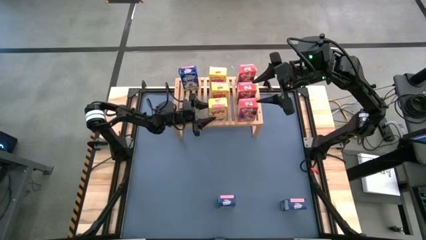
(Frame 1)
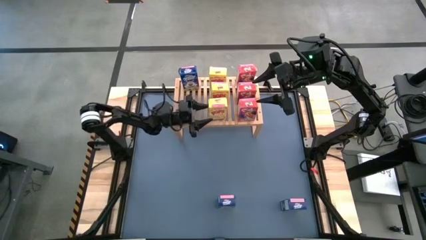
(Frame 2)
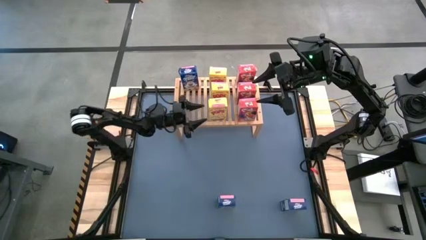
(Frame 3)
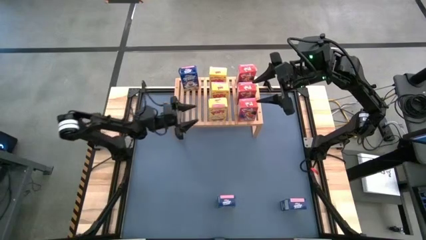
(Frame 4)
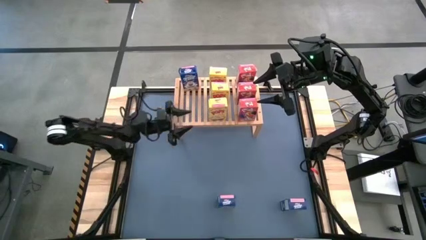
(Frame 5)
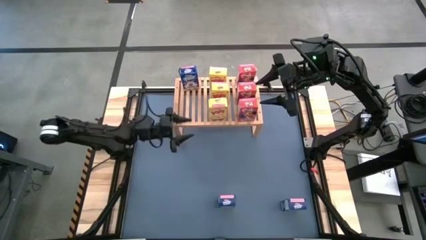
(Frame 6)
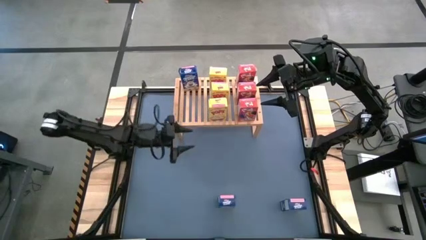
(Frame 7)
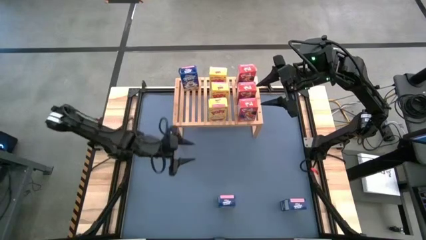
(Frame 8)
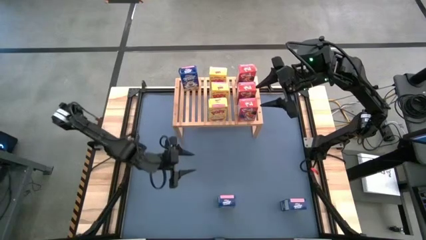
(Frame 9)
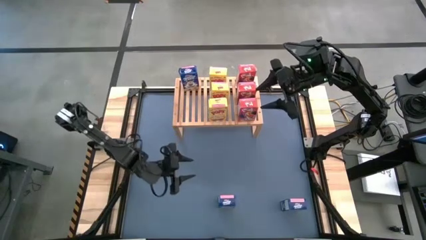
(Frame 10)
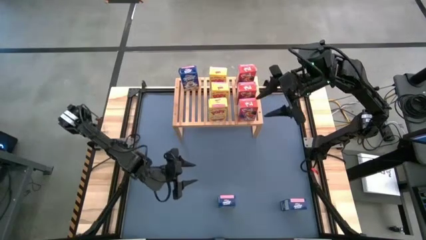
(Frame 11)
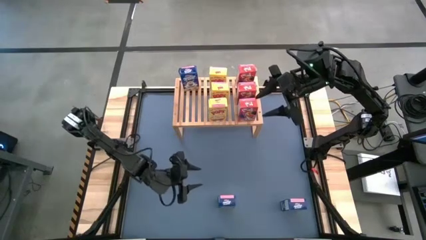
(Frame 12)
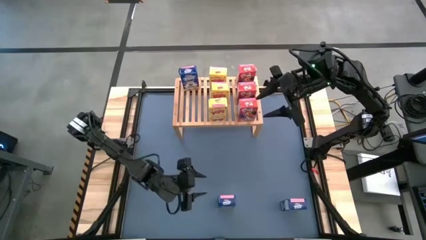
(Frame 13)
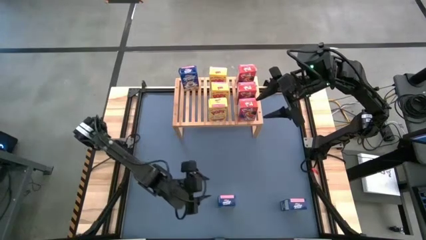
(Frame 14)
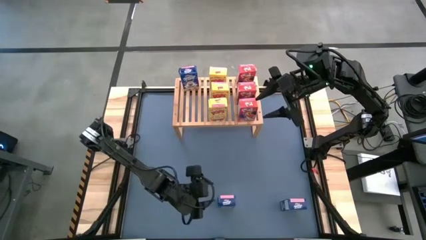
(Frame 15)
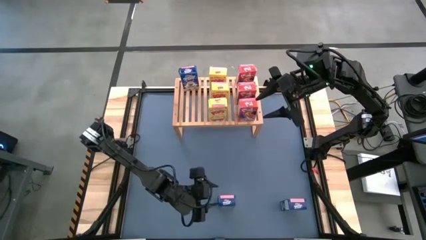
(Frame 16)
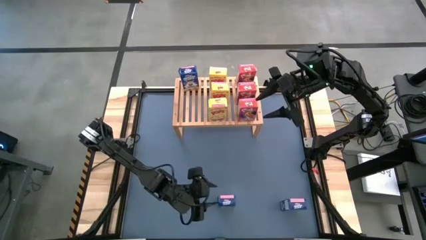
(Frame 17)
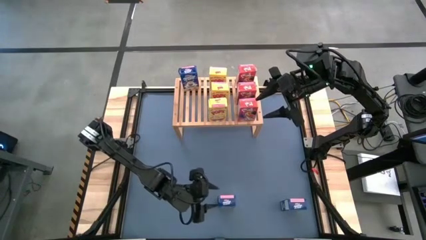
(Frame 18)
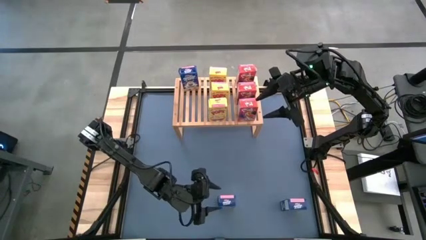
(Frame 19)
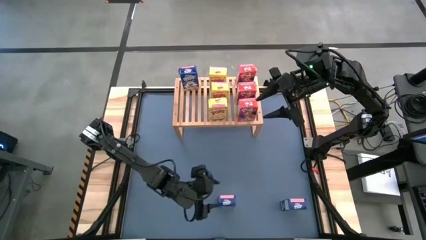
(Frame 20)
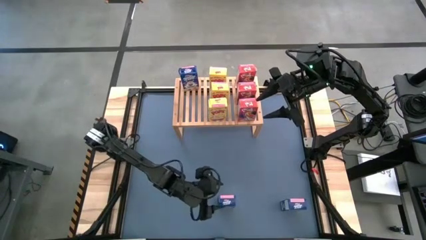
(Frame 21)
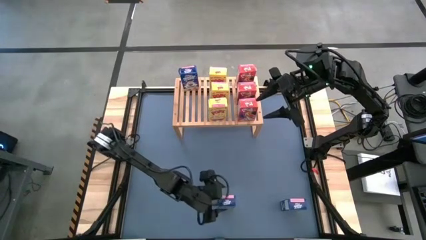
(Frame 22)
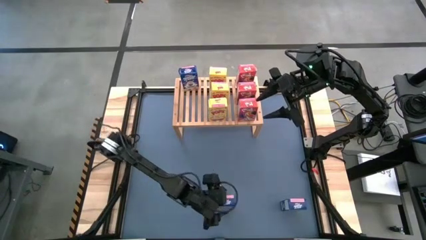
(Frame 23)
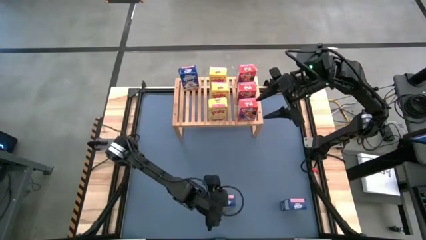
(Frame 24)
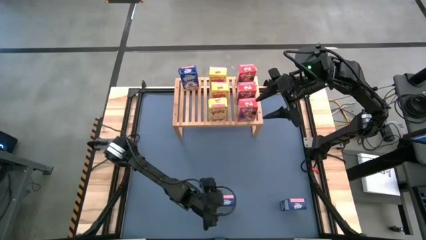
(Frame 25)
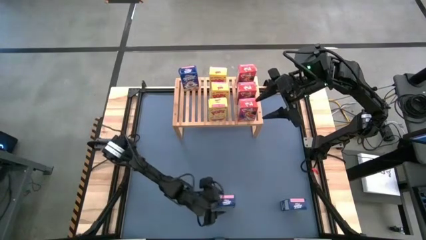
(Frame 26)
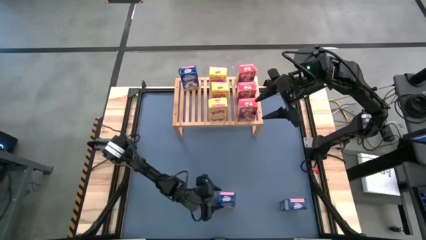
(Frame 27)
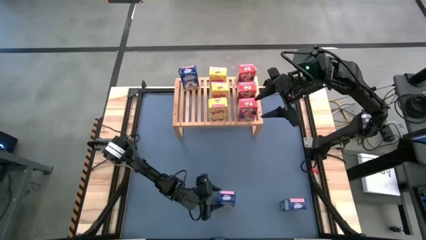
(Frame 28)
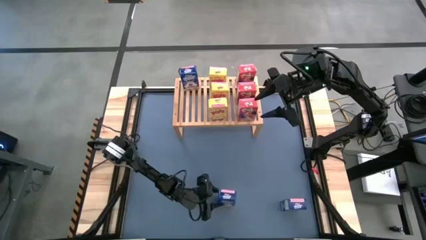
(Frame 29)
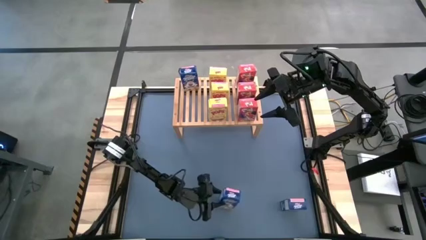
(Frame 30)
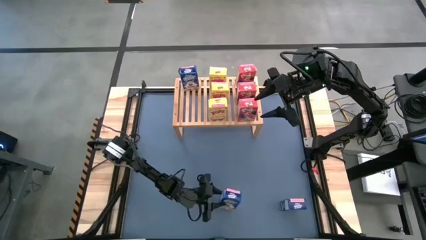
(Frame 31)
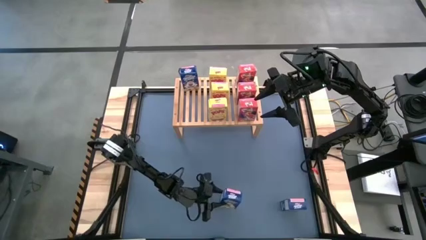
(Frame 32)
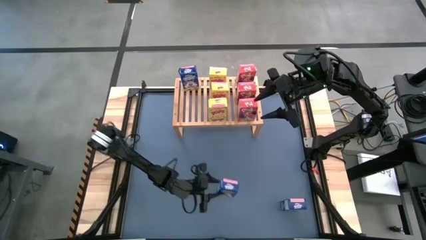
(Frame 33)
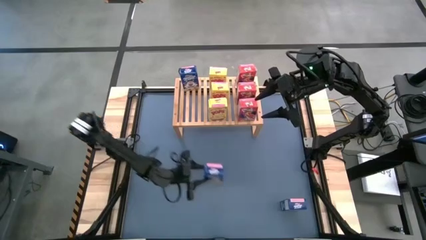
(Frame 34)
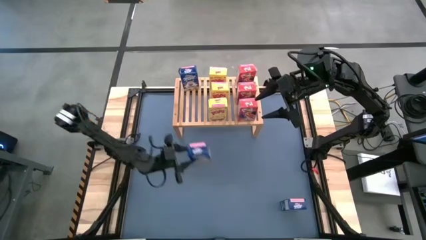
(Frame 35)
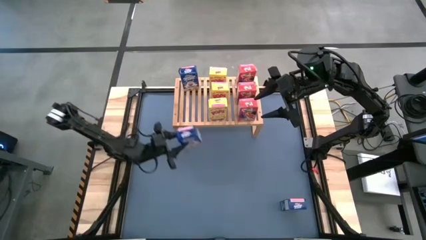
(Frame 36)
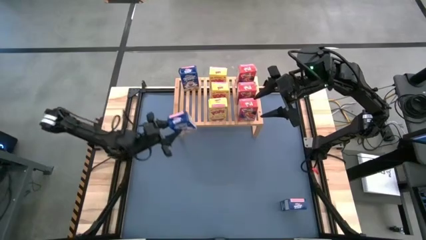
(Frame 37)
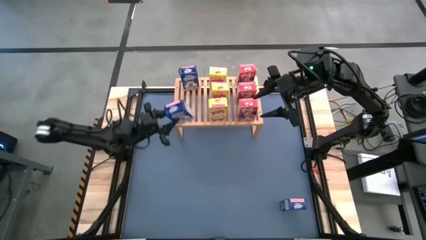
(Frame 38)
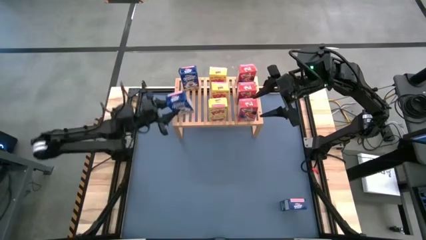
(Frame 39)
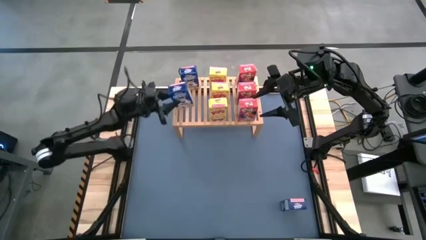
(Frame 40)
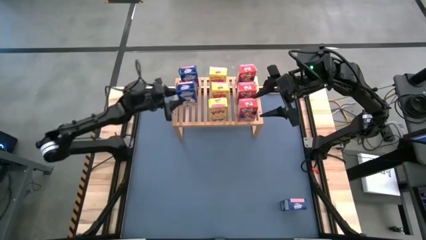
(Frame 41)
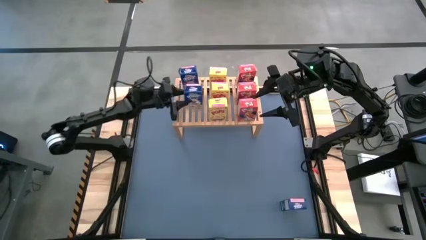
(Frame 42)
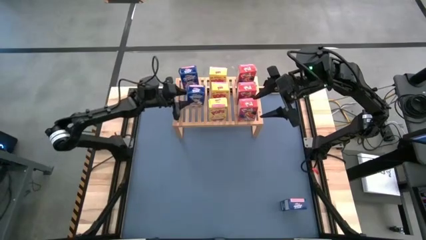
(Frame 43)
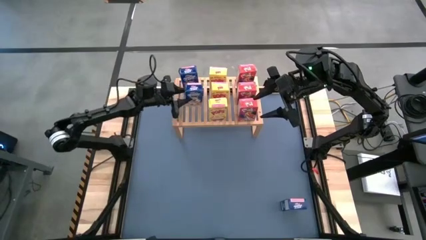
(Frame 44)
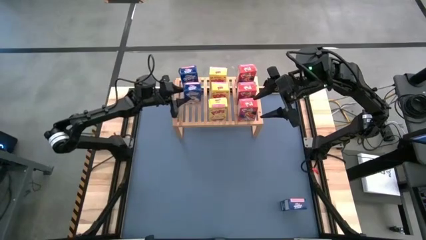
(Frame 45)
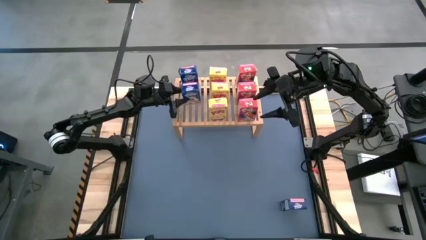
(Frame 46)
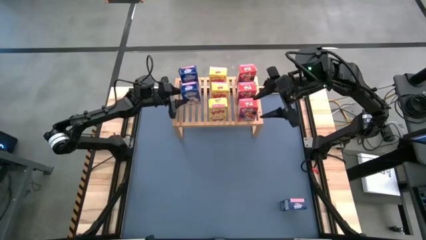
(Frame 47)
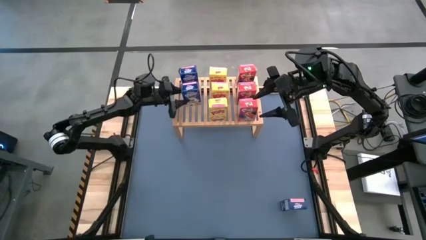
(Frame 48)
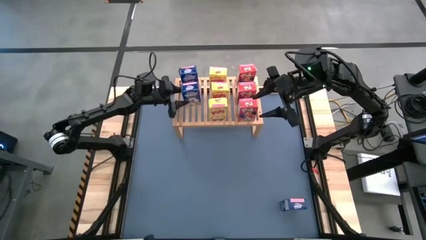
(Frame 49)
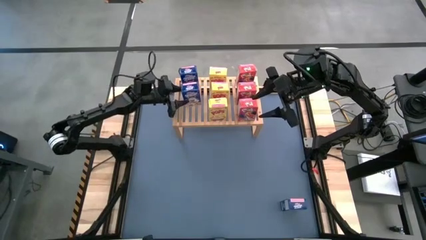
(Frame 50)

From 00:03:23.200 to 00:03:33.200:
Task: Stack cereal on shelf
Put the left blue cereal box on the shelf aligned with the other blue cereal box

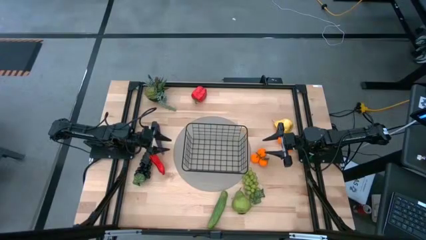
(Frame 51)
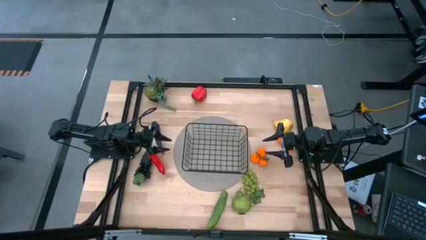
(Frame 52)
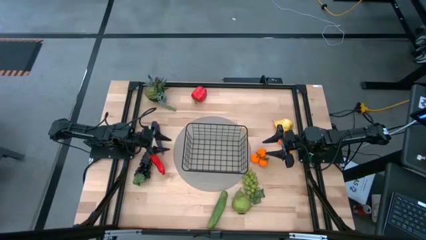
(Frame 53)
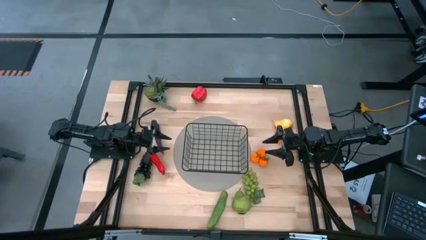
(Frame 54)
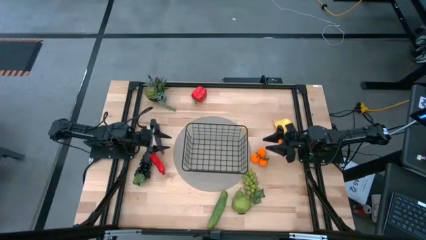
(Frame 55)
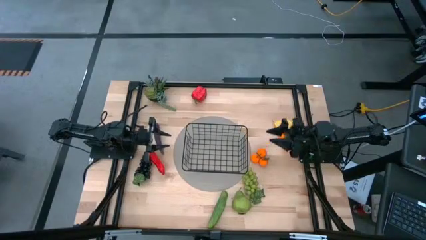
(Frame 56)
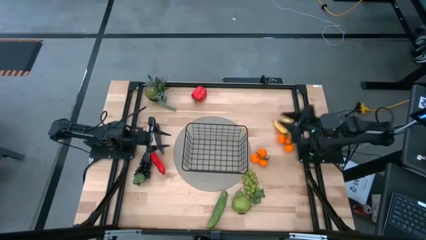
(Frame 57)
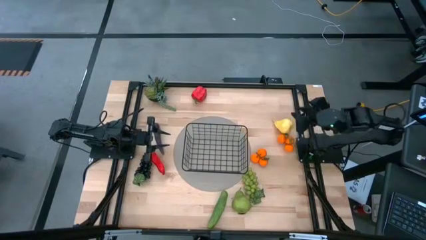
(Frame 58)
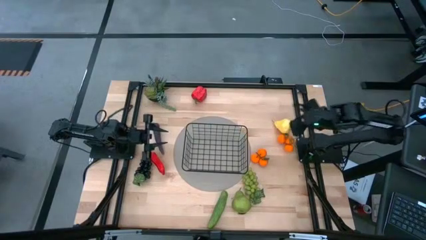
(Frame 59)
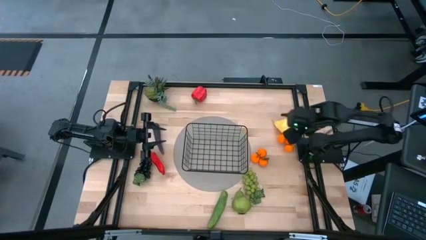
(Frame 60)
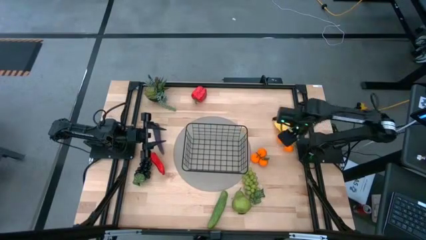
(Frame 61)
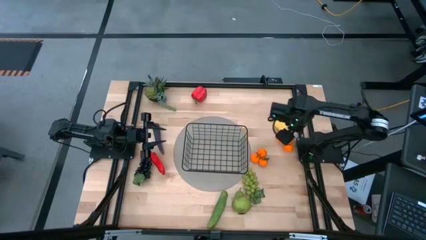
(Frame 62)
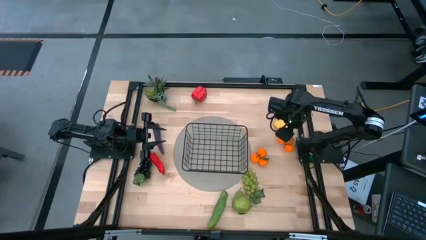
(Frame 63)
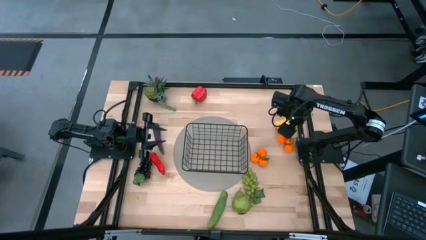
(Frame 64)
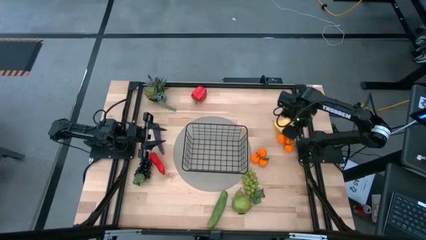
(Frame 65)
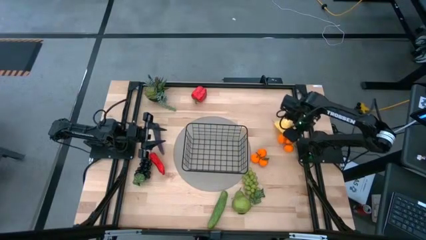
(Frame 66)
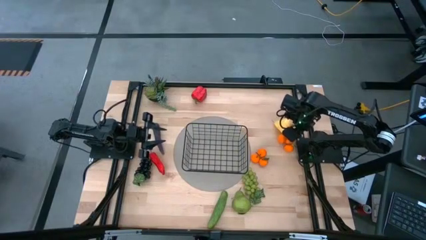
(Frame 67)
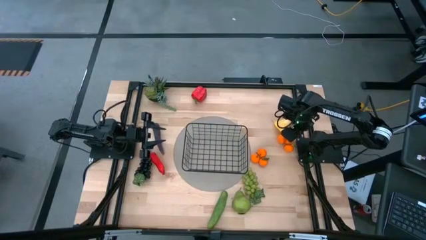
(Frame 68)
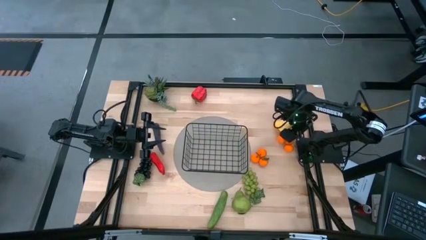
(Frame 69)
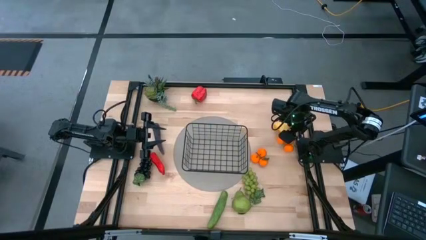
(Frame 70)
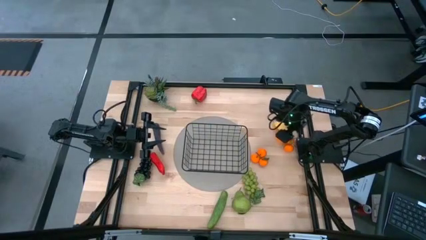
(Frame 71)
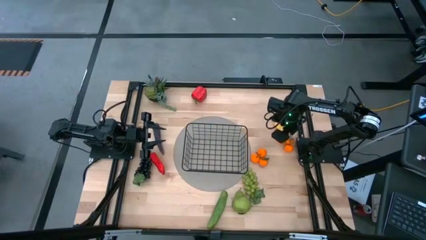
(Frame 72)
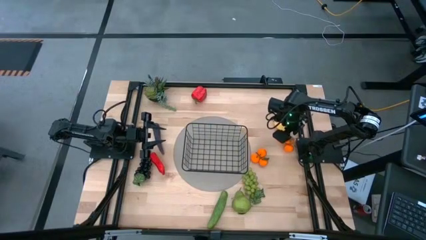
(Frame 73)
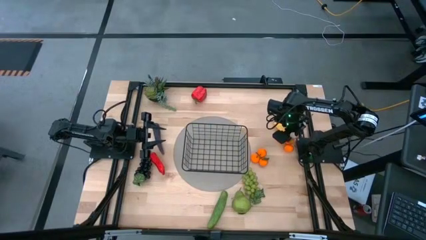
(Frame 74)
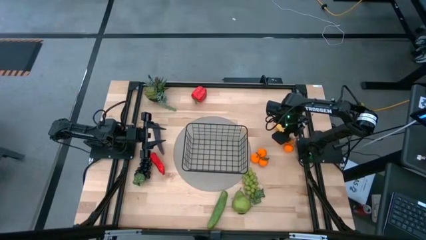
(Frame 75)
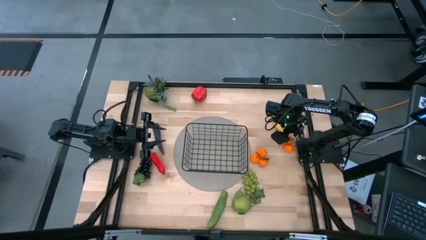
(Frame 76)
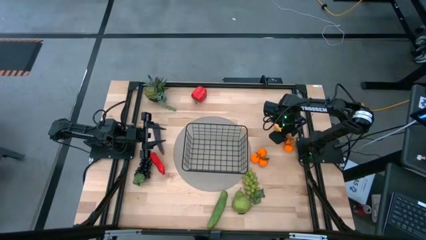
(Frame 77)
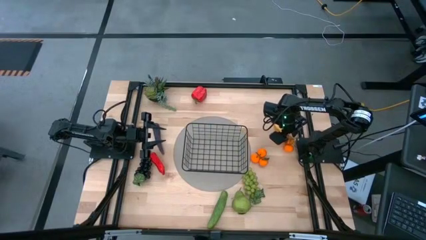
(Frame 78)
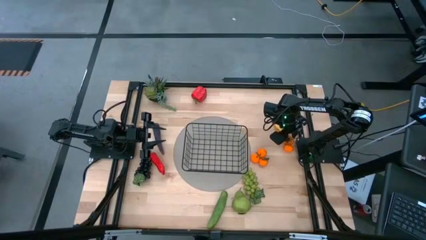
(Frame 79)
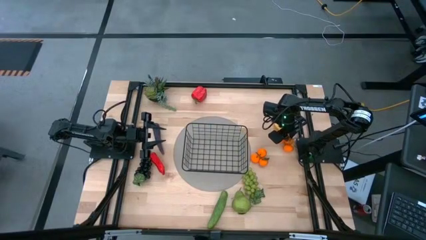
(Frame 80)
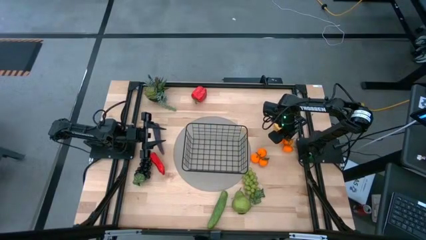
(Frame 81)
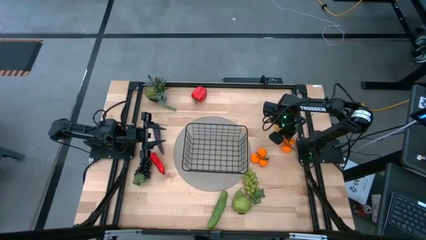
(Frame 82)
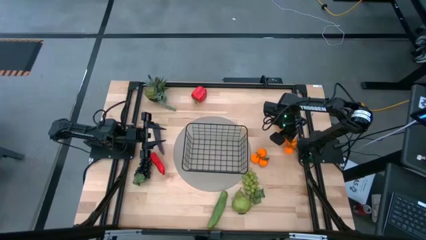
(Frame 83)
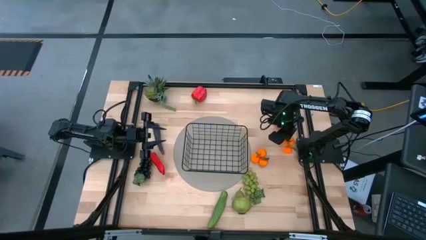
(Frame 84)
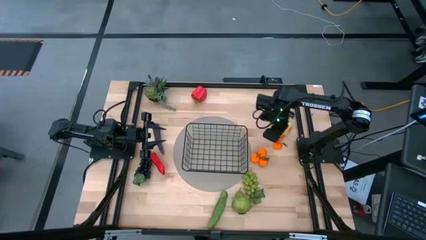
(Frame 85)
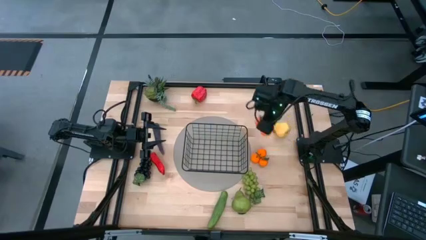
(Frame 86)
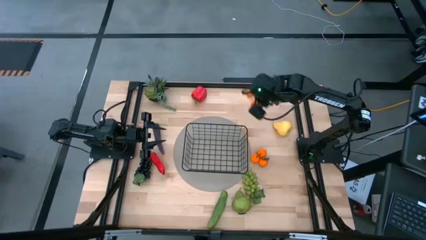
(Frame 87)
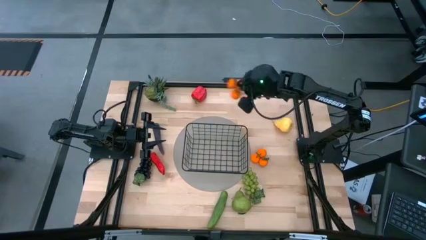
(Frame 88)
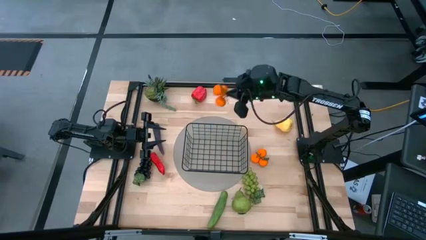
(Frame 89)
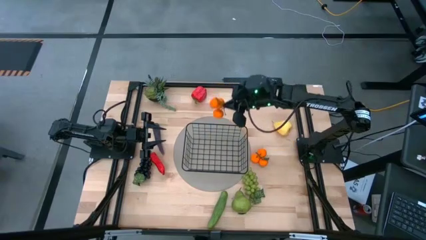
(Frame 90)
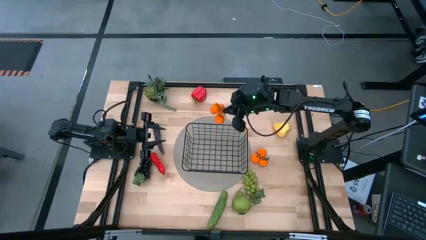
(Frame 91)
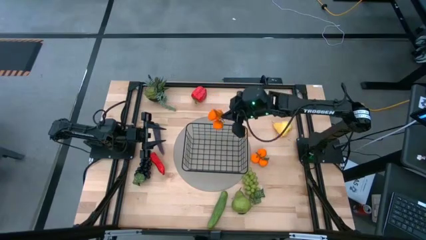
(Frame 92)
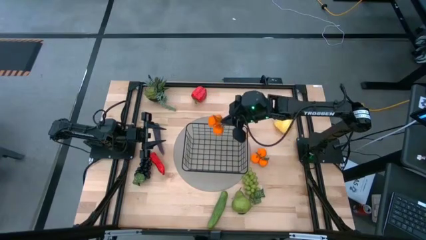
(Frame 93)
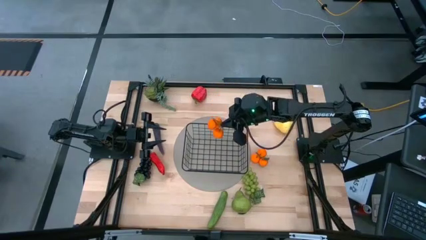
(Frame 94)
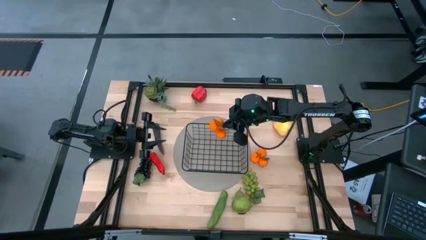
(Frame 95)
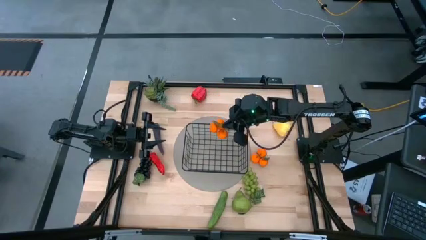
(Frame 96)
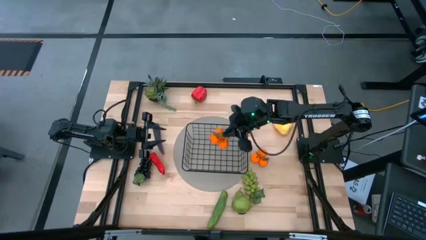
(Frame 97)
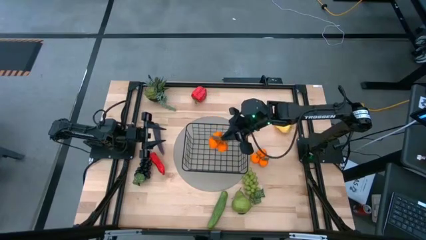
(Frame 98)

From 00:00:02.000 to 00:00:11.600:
Task: Build produce basket
Put the right tangerine into the black wire basket
